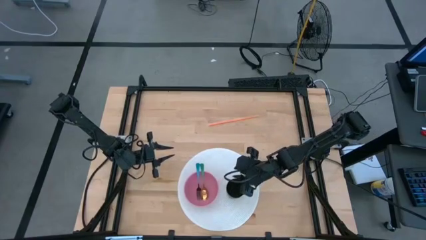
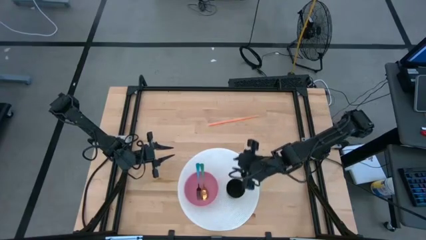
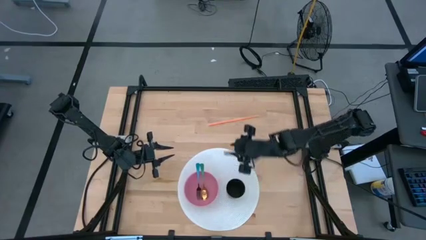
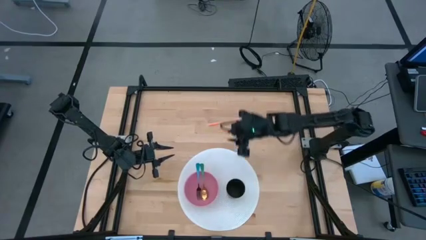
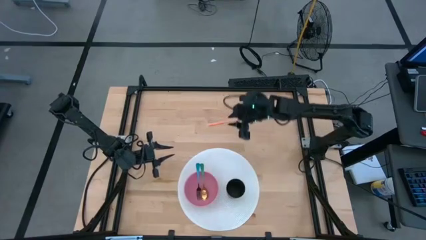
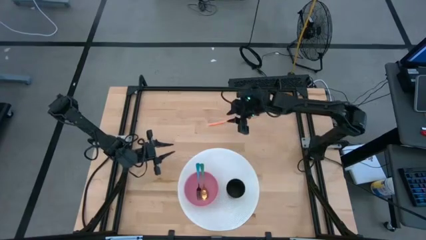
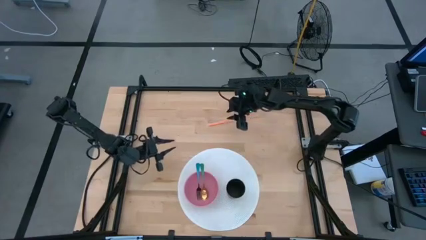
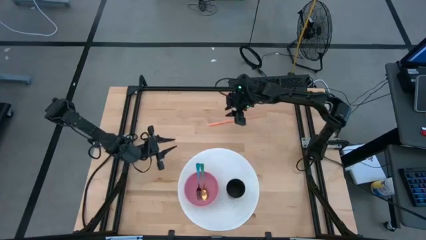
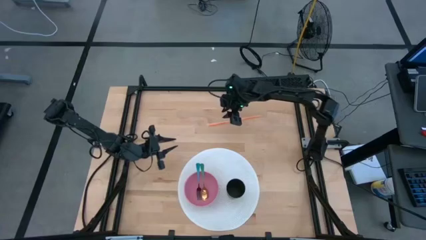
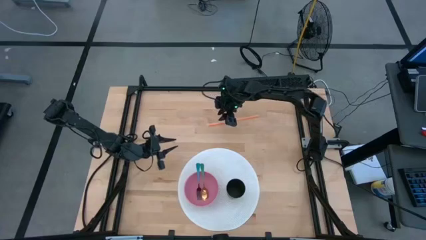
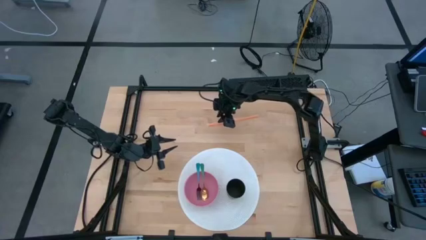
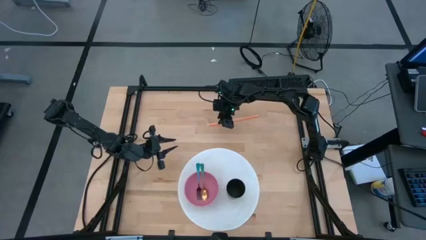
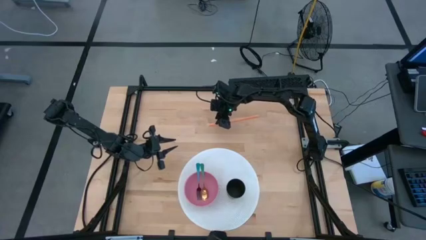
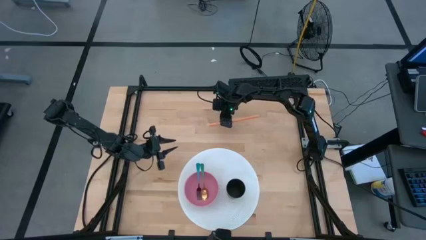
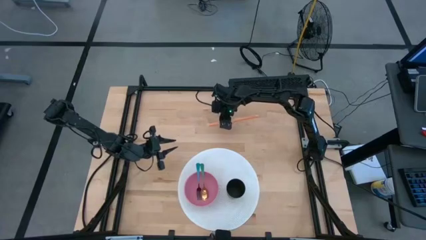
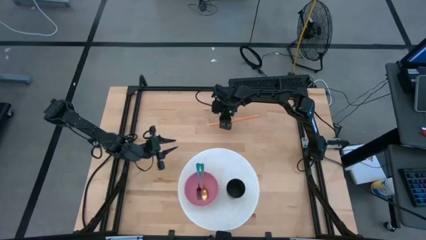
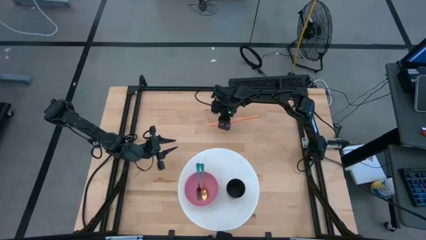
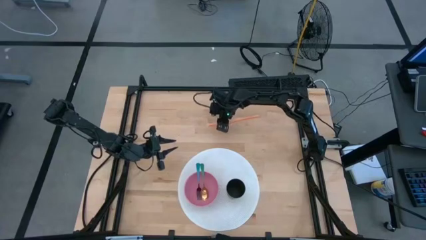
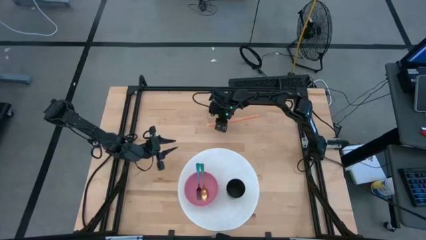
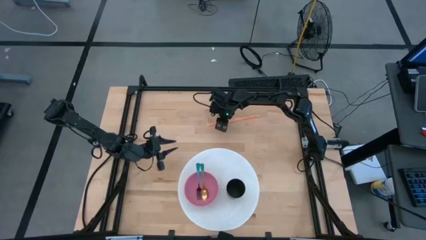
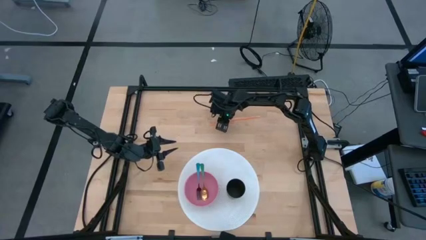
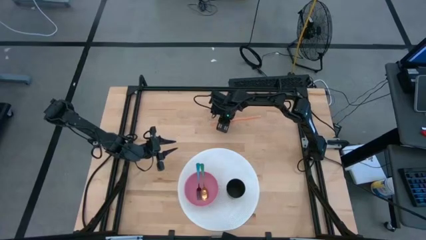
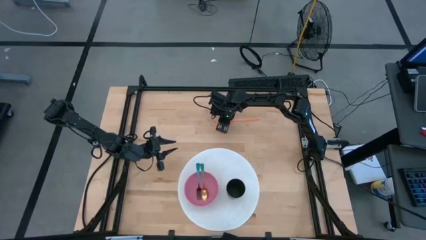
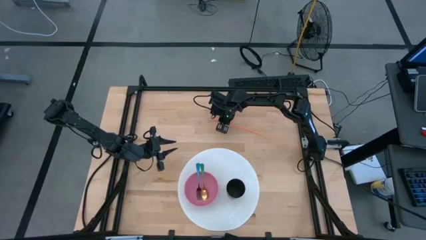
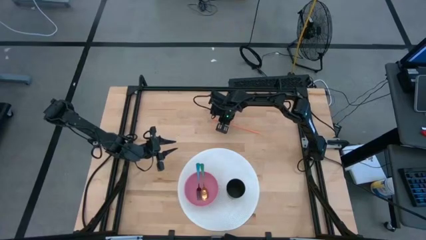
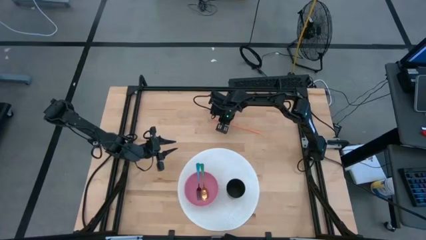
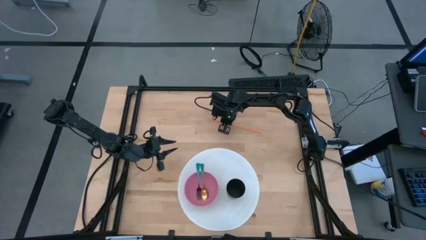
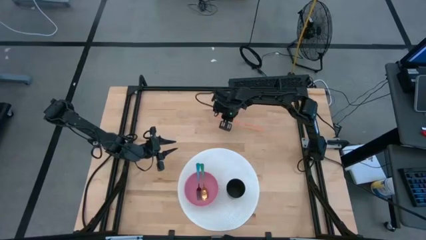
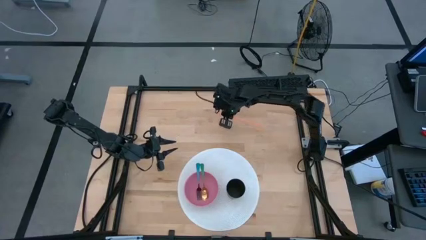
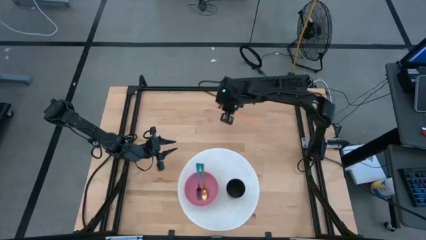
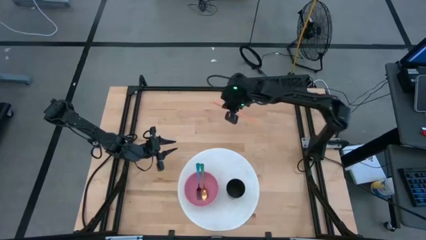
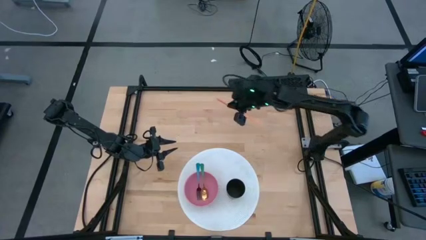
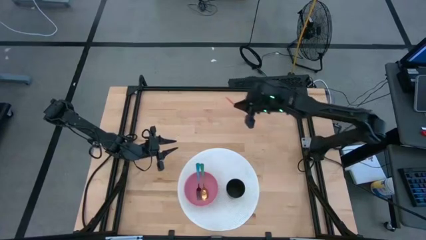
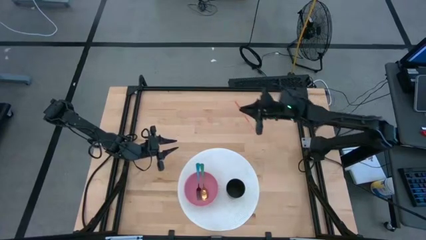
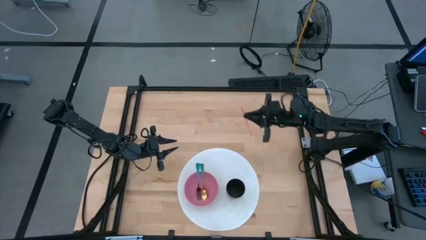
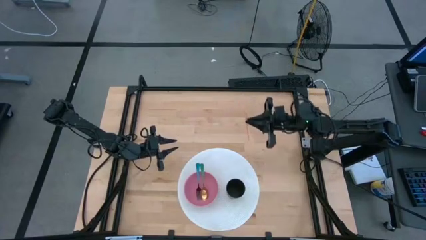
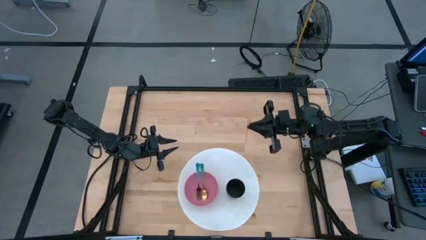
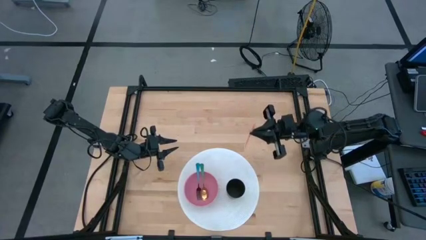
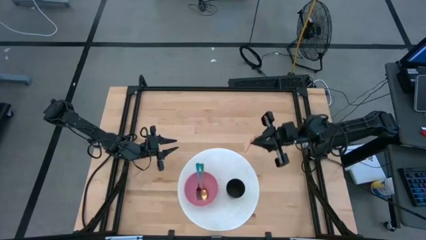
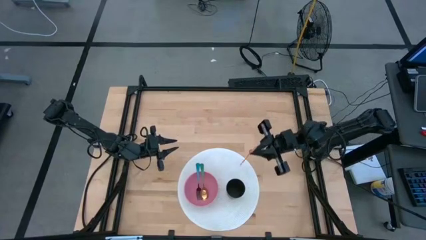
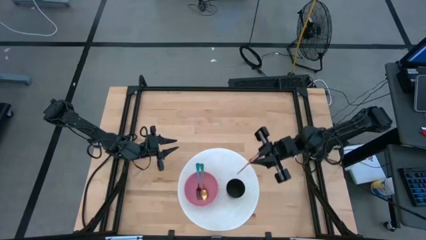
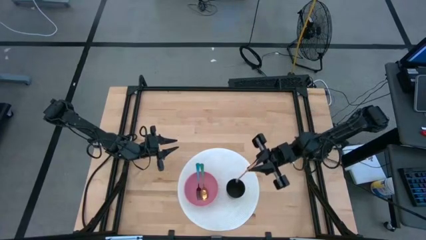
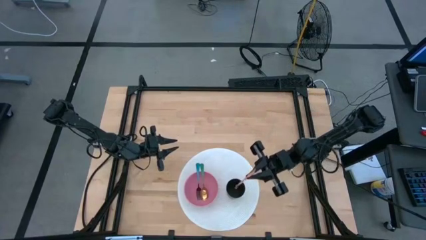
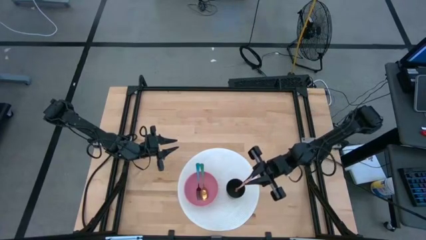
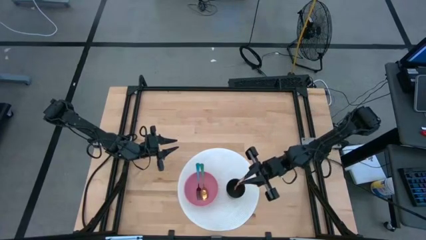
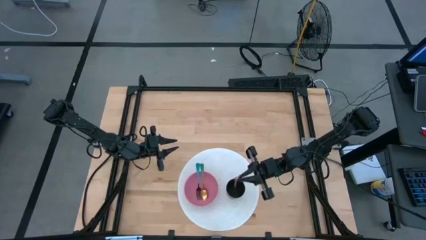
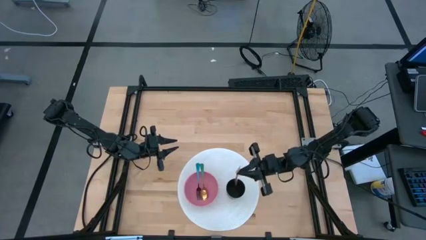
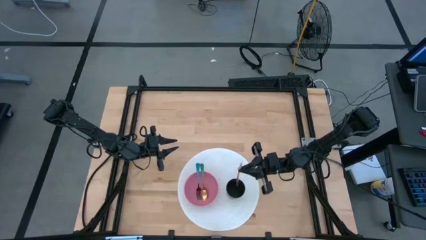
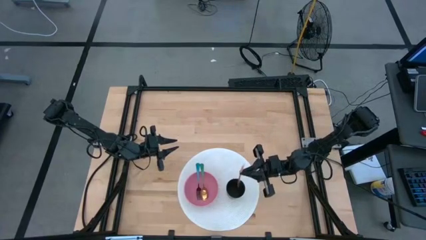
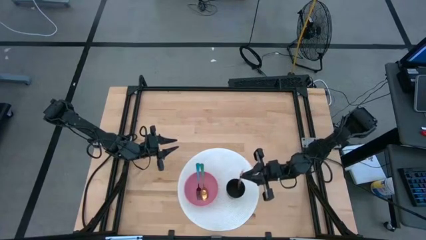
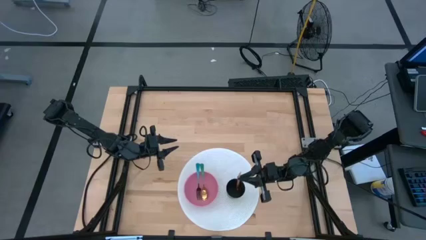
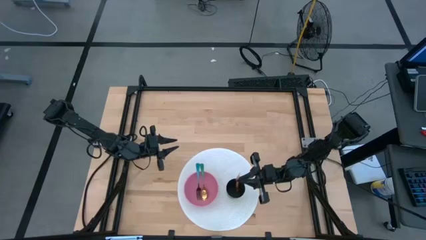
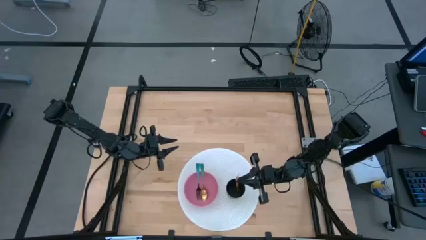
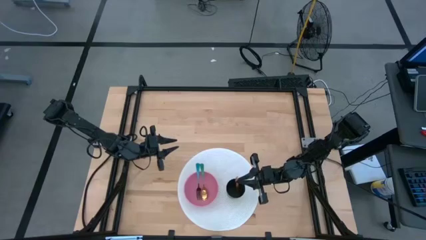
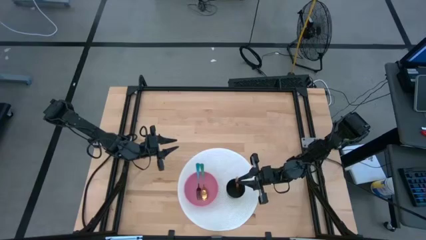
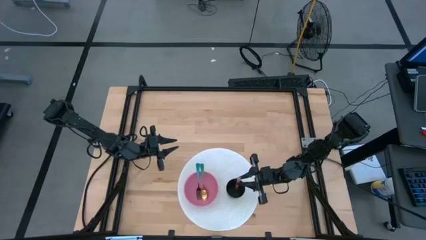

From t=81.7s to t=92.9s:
Task: Pick & Place Utensil
Put the orange straw into the black cup
